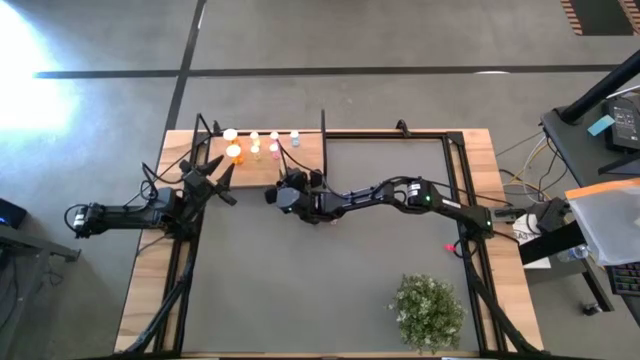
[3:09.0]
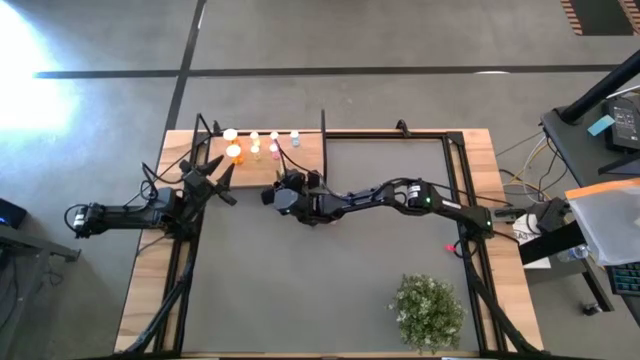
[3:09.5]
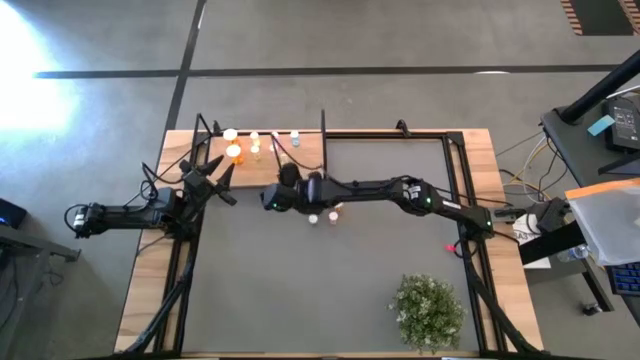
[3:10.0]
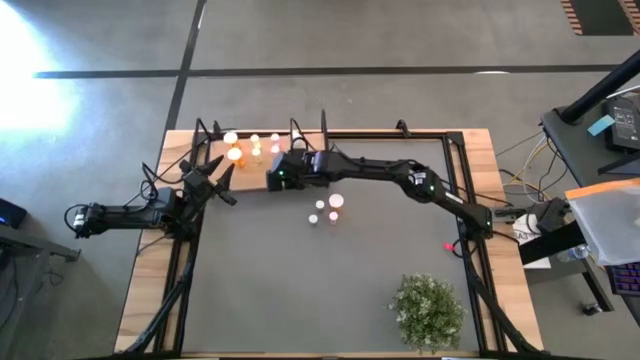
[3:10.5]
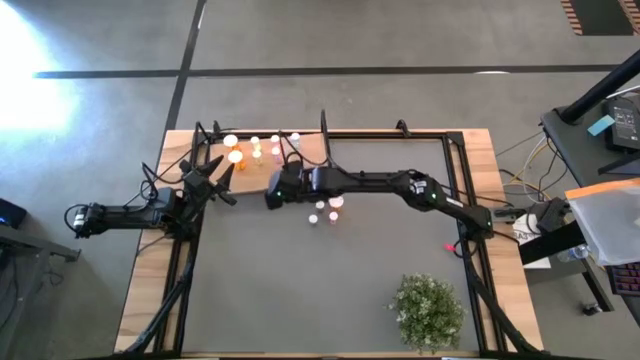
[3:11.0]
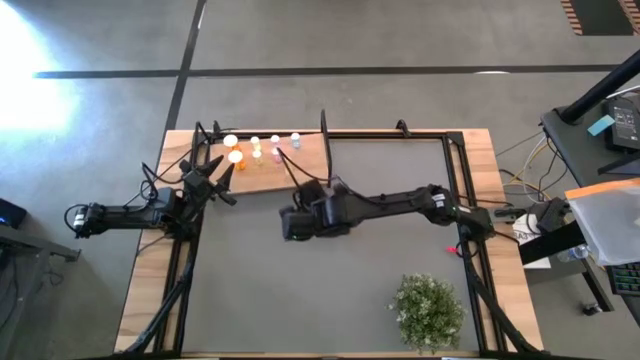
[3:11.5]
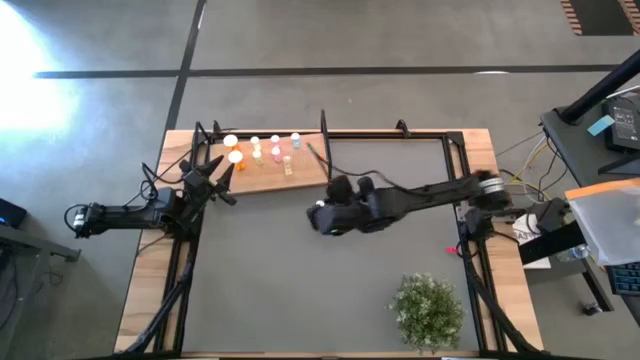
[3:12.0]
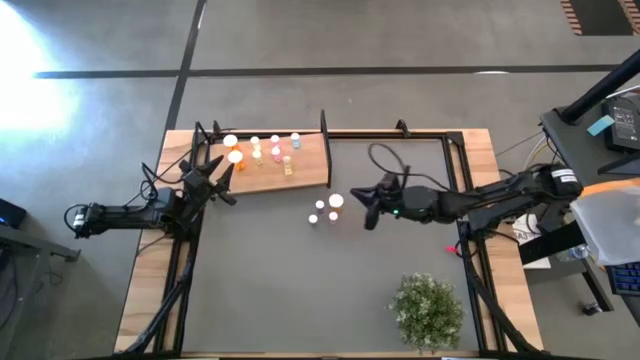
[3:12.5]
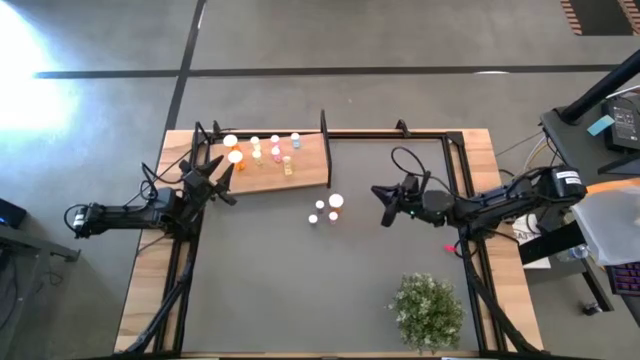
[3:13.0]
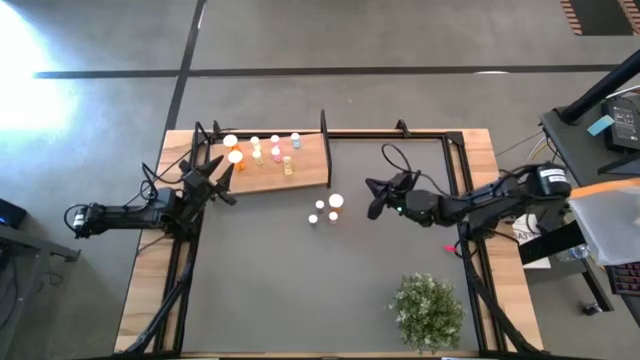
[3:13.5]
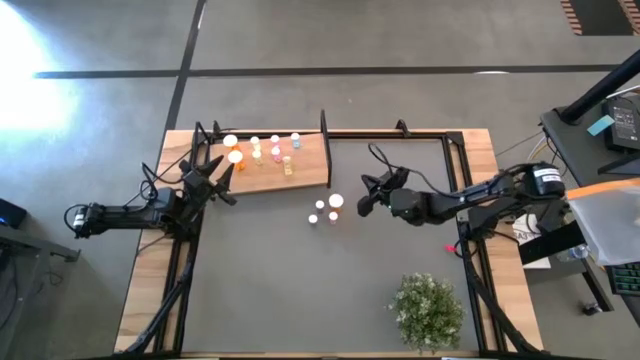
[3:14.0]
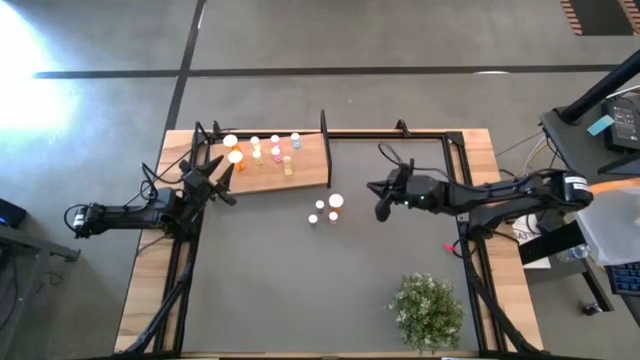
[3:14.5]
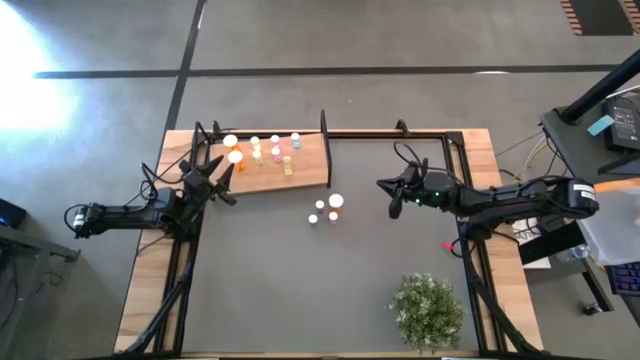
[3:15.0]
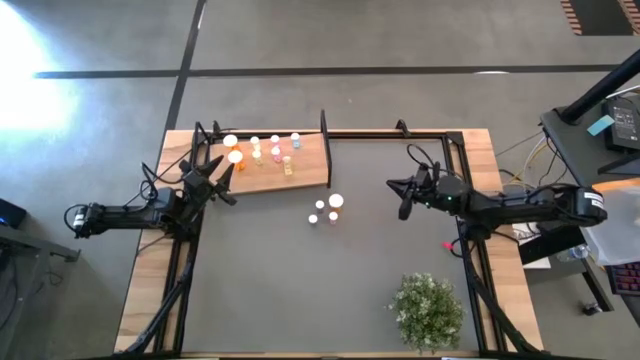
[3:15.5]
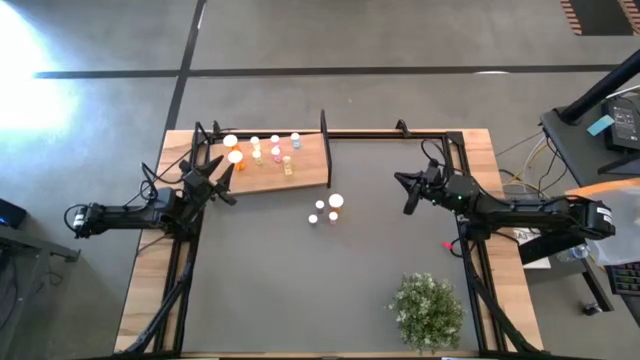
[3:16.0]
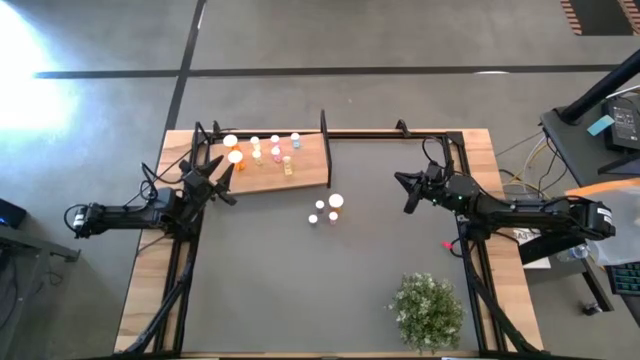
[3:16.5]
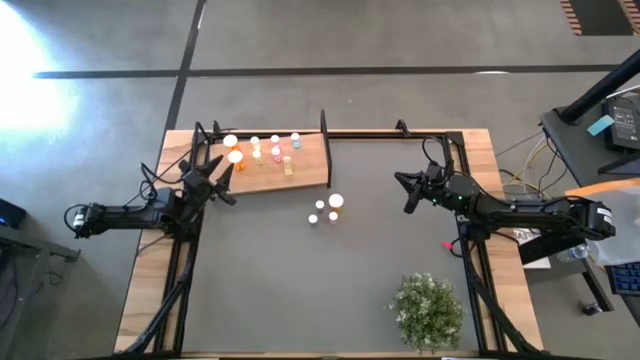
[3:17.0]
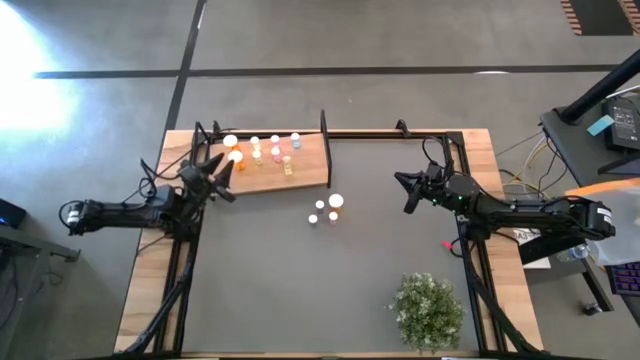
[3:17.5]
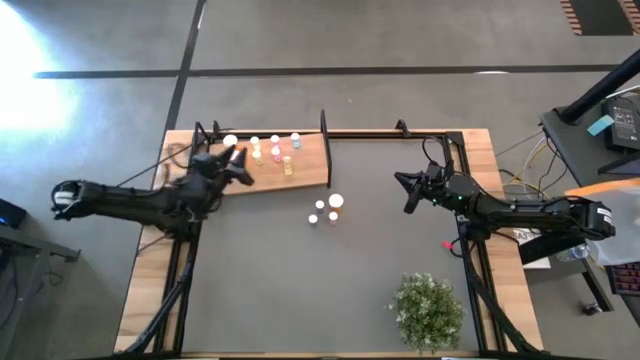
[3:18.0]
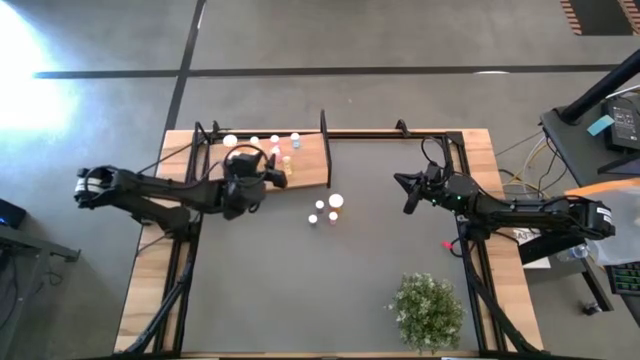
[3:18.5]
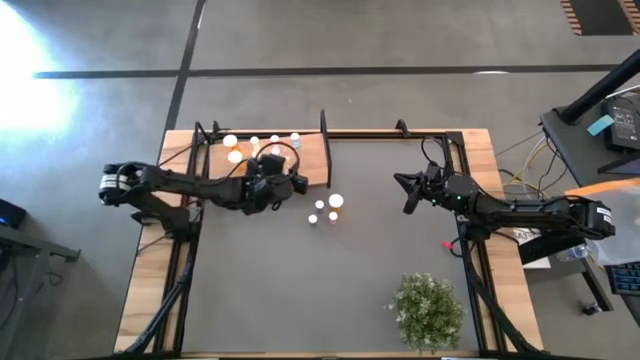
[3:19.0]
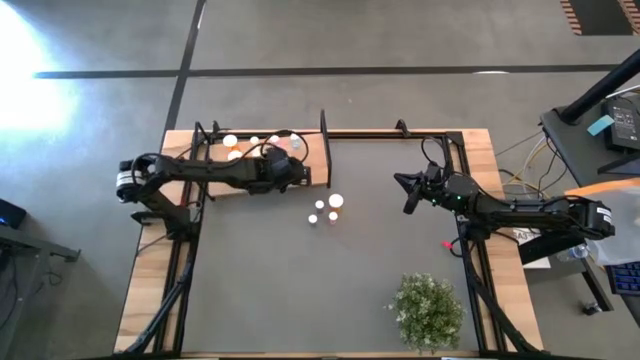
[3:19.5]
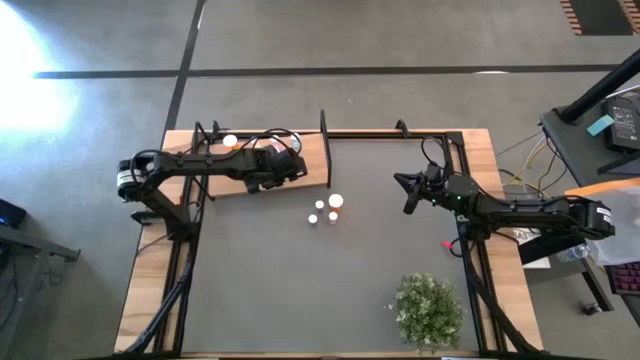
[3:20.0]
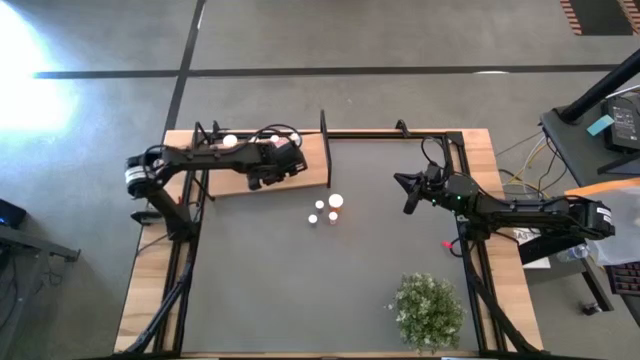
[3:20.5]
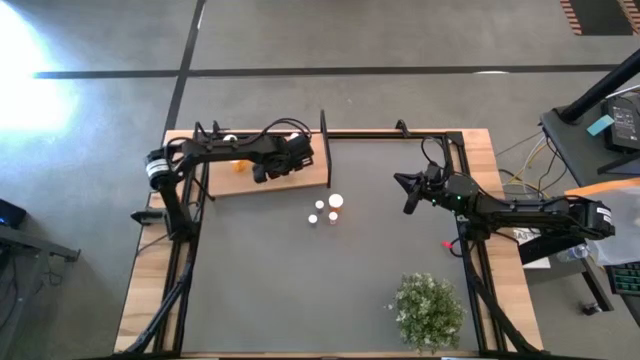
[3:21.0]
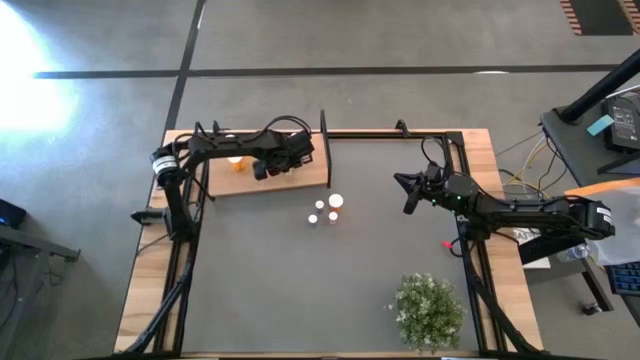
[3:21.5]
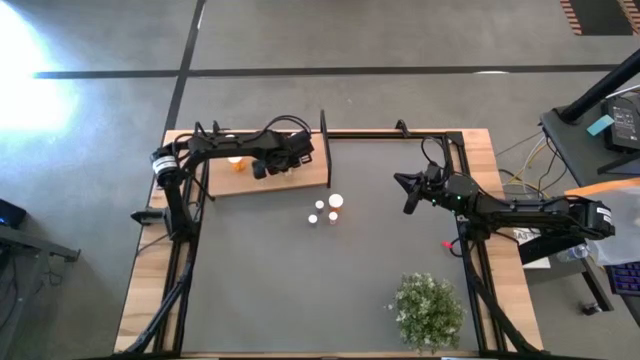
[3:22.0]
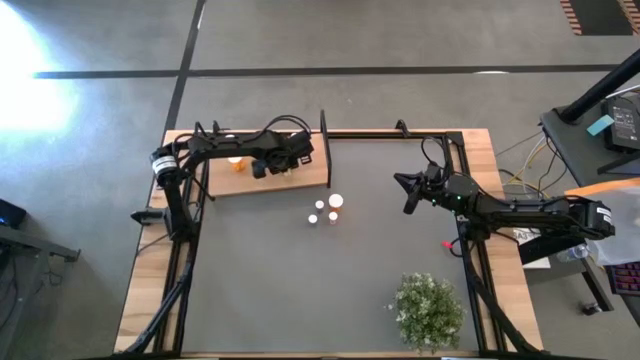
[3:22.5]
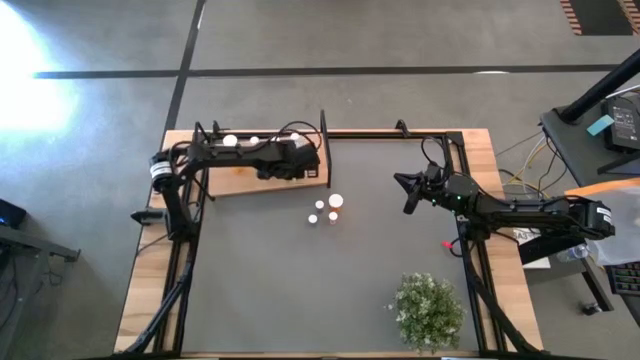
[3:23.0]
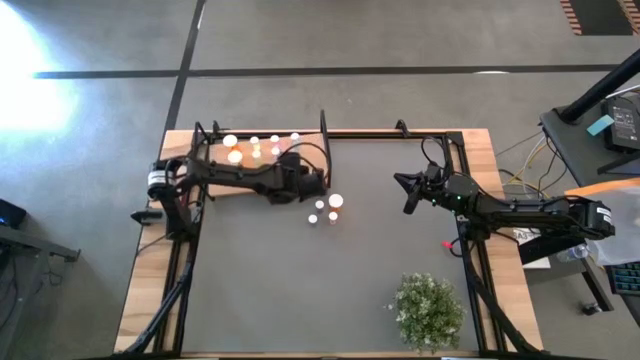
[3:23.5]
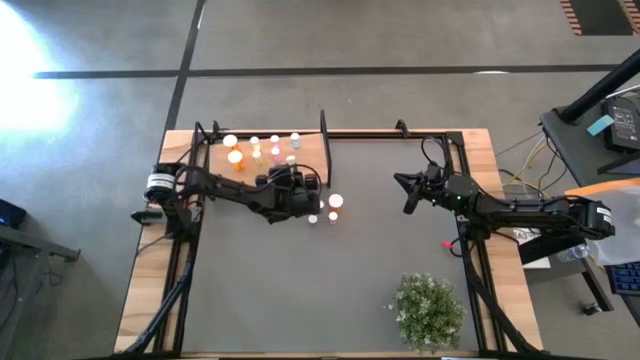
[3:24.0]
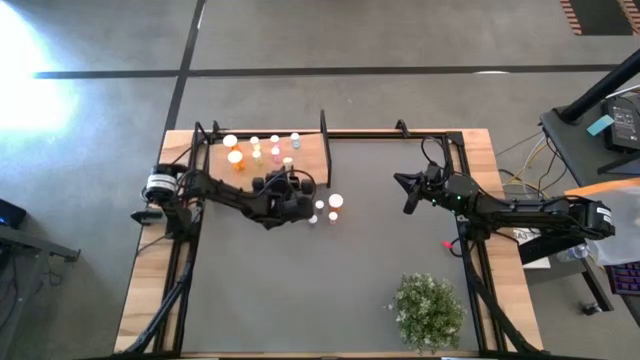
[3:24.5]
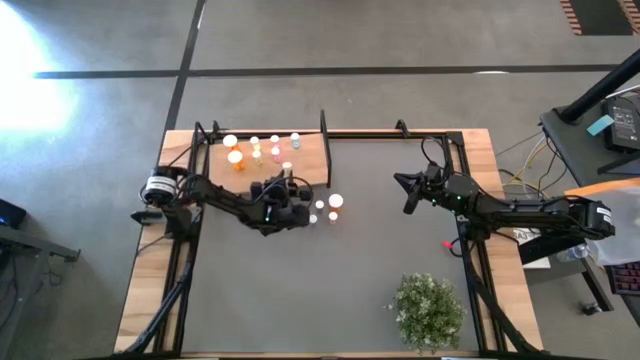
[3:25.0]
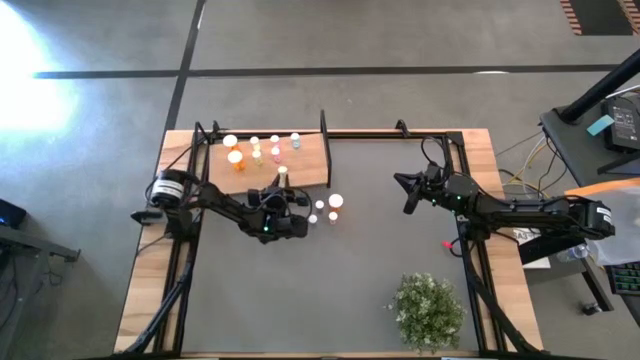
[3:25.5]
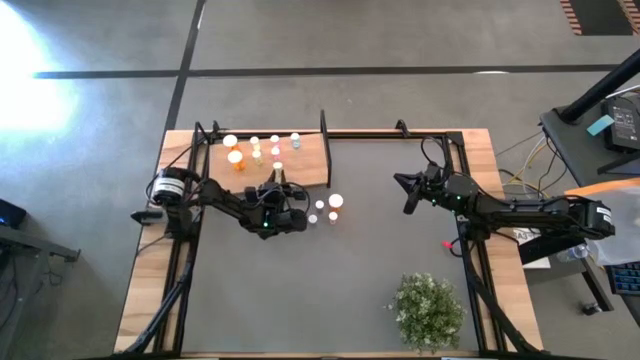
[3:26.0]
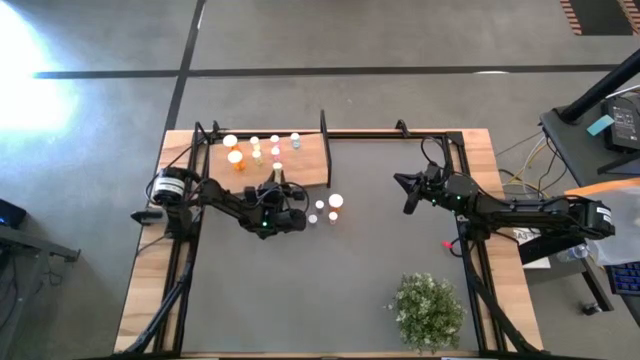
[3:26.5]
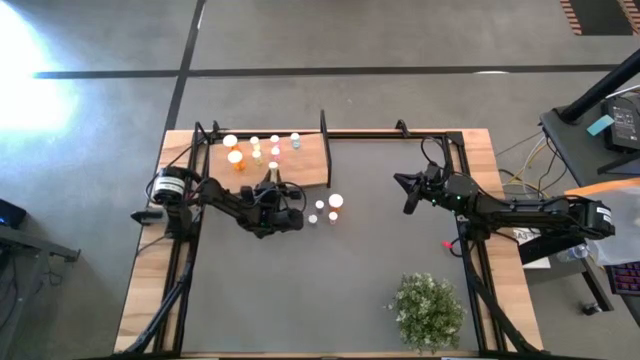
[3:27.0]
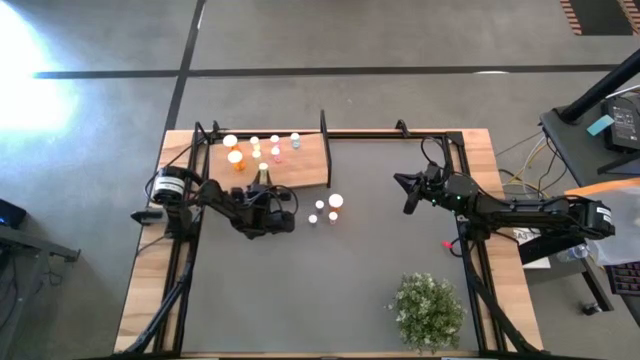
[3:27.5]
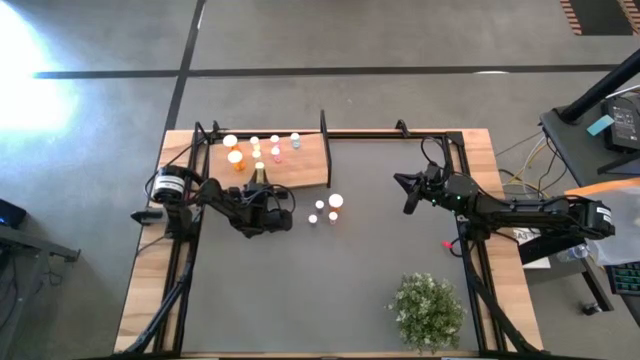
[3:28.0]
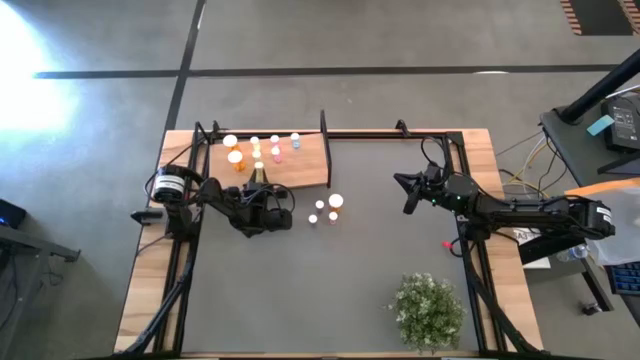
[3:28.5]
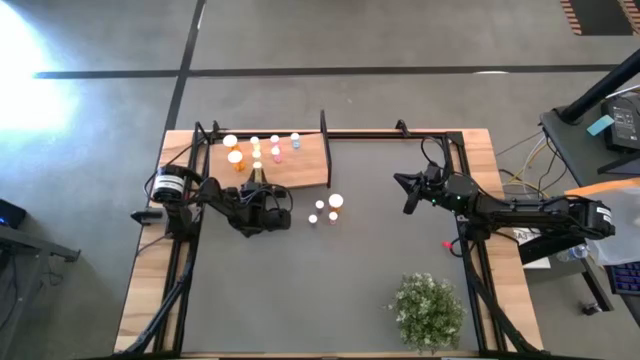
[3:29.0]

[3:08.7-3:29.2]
Task: Pick and place medicine bottles onto shelf by color
Put the yellow pill bottle on the shelf aligned with the other yellow pill bottle

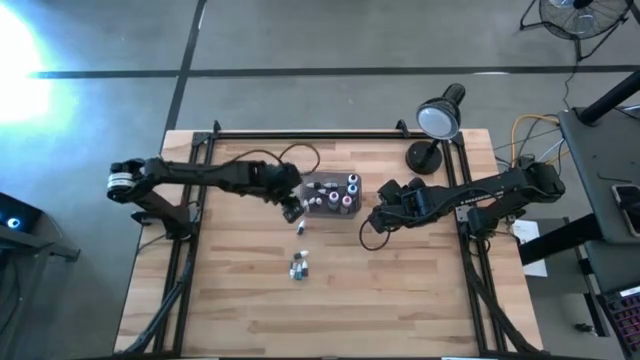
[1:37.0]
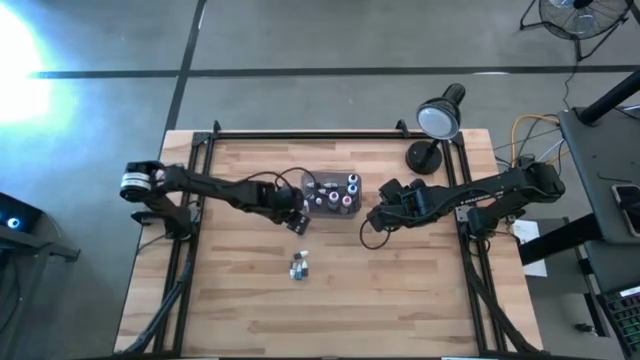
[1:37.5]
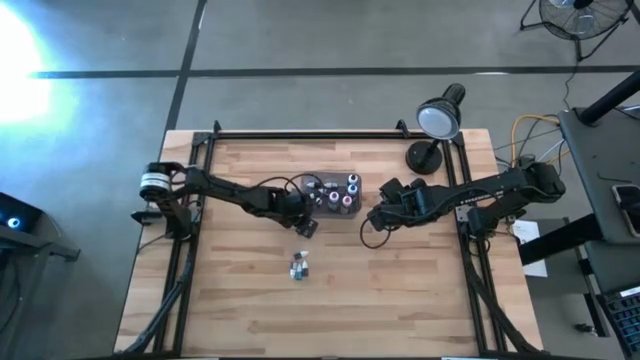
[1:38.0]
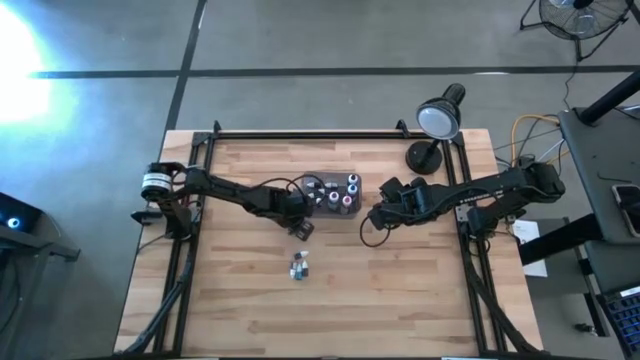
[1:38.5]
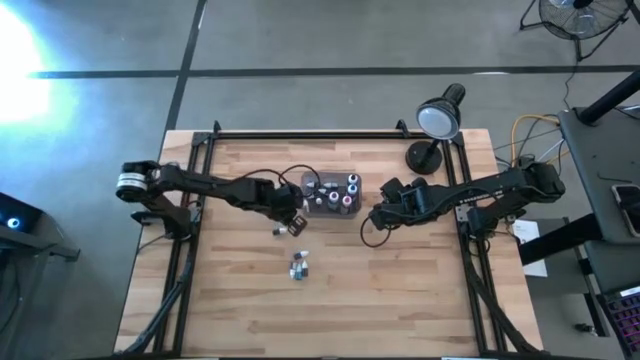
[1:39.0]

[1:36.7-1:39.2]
Task: Pick & Place food coloring
Put the small black food coloring bottle into the bin
